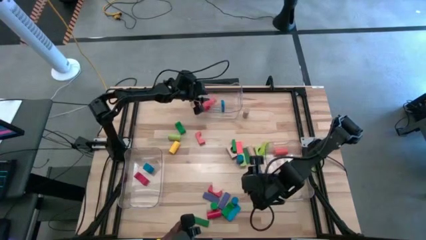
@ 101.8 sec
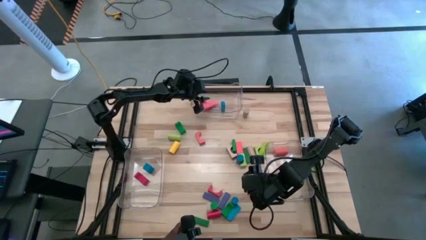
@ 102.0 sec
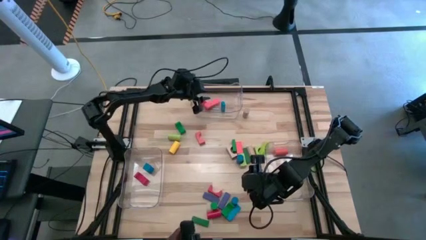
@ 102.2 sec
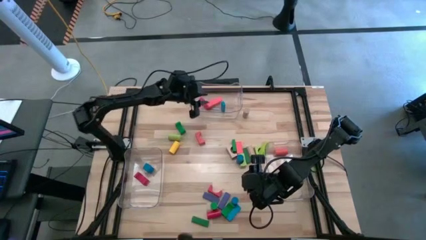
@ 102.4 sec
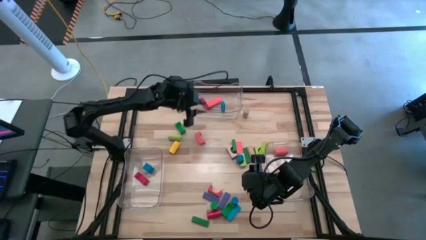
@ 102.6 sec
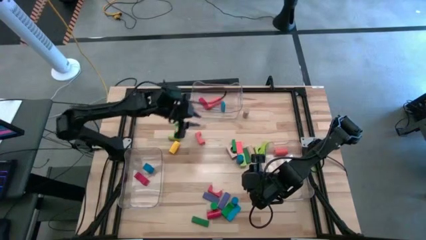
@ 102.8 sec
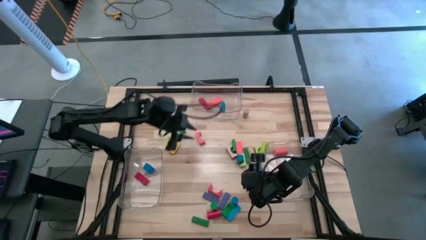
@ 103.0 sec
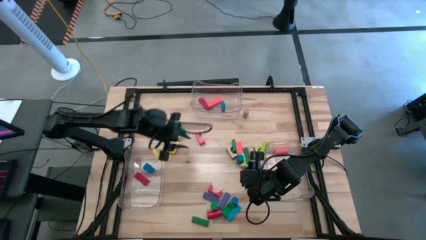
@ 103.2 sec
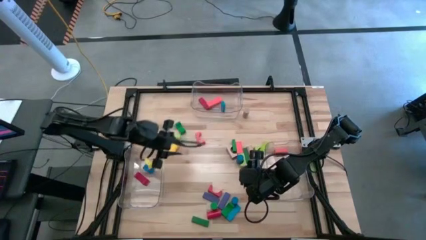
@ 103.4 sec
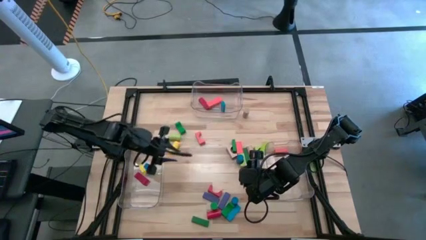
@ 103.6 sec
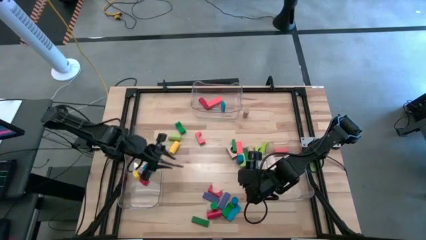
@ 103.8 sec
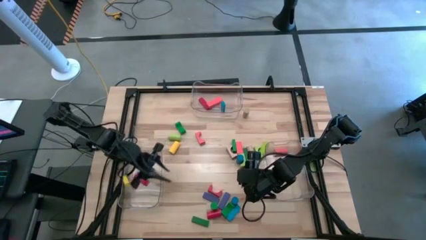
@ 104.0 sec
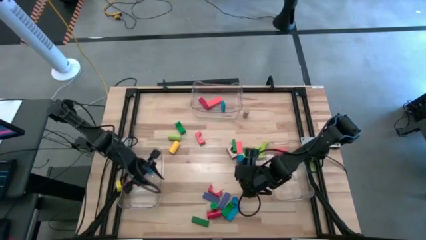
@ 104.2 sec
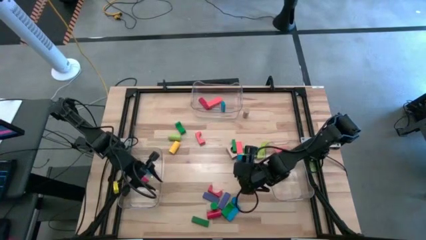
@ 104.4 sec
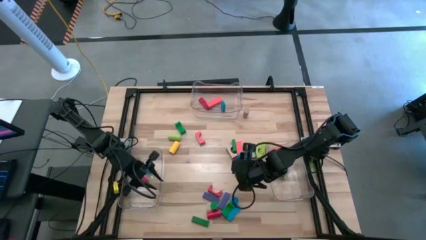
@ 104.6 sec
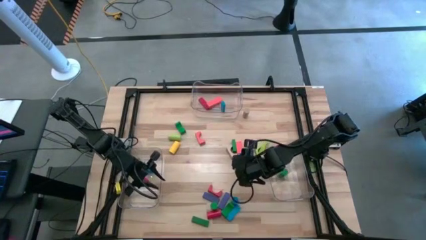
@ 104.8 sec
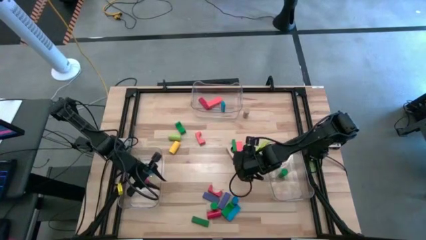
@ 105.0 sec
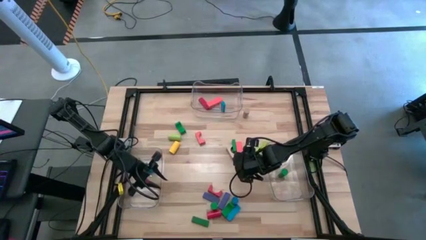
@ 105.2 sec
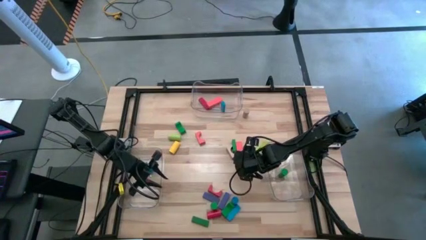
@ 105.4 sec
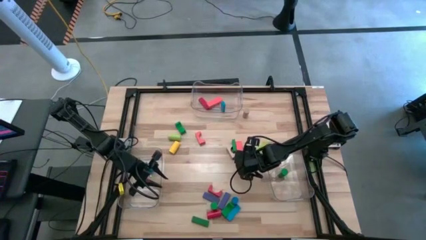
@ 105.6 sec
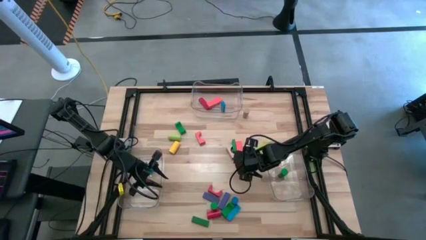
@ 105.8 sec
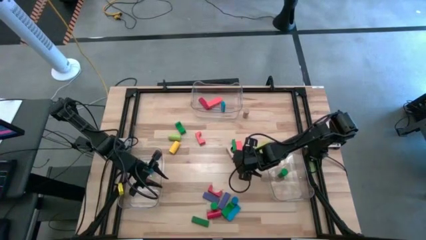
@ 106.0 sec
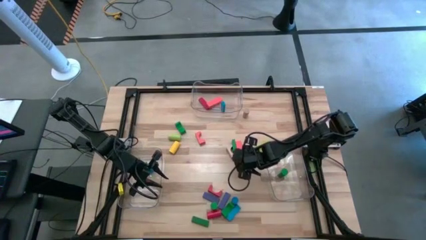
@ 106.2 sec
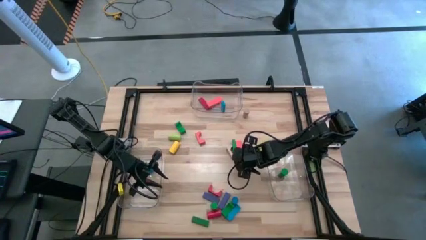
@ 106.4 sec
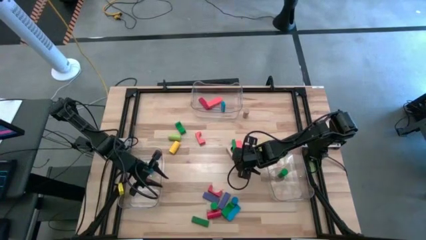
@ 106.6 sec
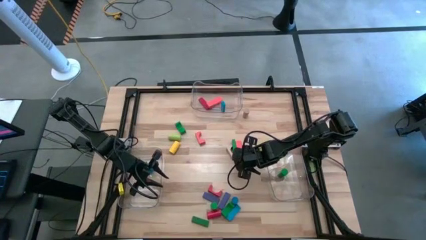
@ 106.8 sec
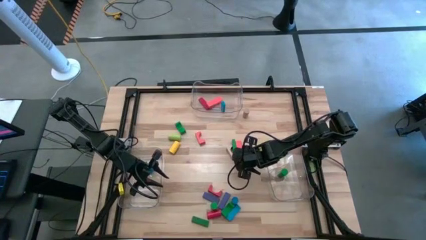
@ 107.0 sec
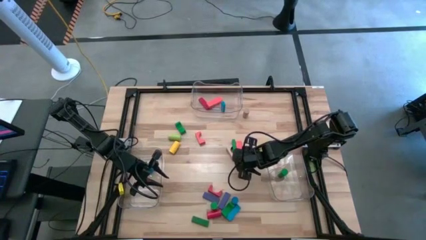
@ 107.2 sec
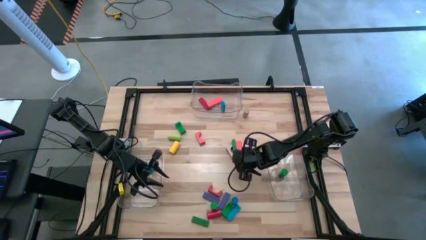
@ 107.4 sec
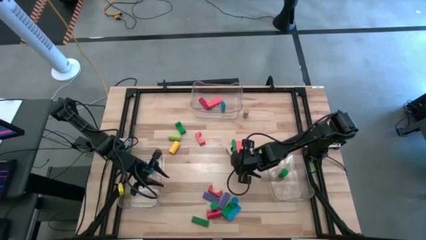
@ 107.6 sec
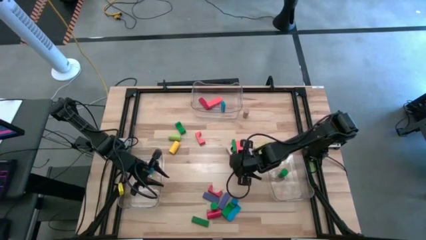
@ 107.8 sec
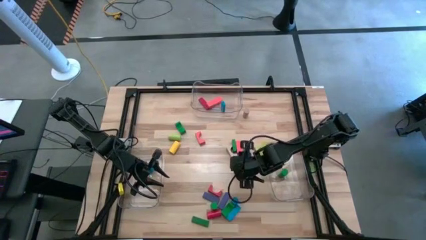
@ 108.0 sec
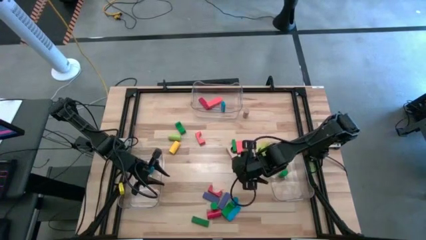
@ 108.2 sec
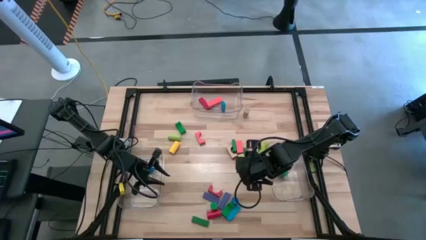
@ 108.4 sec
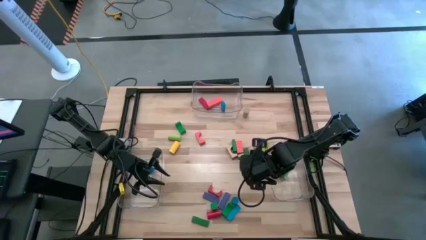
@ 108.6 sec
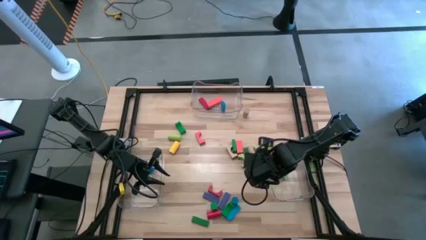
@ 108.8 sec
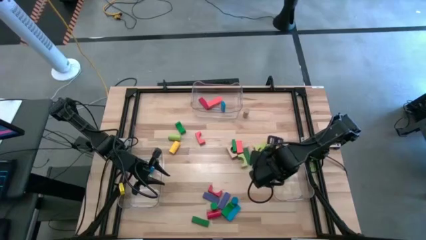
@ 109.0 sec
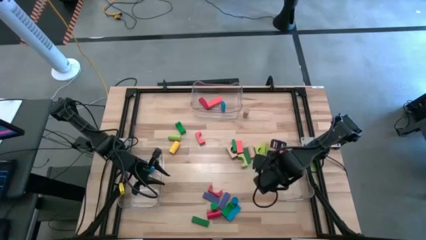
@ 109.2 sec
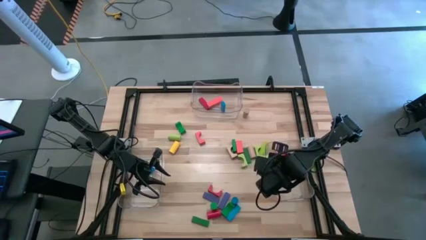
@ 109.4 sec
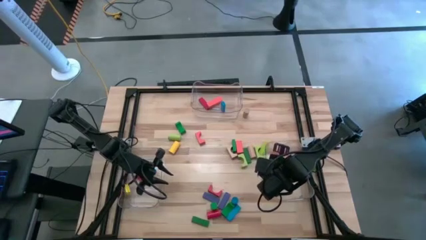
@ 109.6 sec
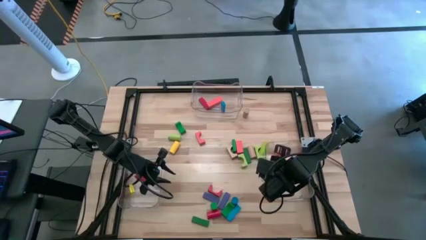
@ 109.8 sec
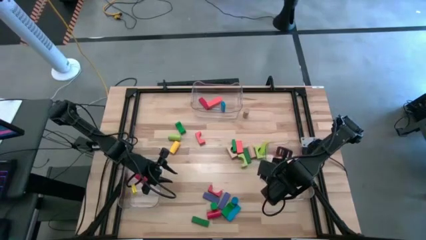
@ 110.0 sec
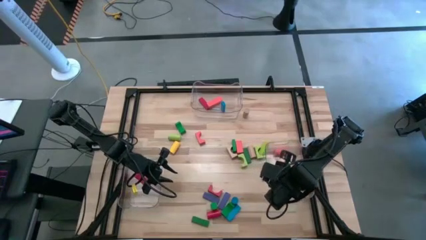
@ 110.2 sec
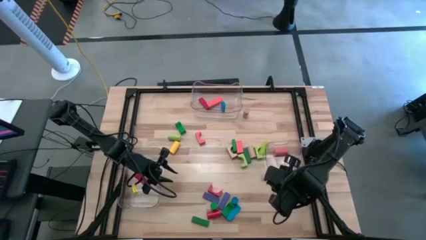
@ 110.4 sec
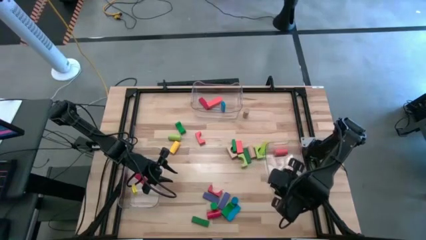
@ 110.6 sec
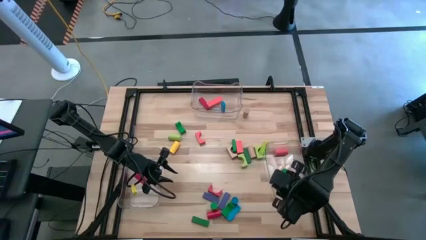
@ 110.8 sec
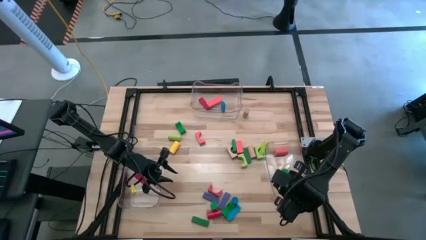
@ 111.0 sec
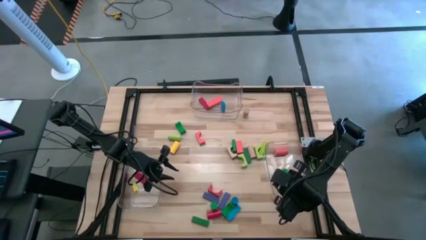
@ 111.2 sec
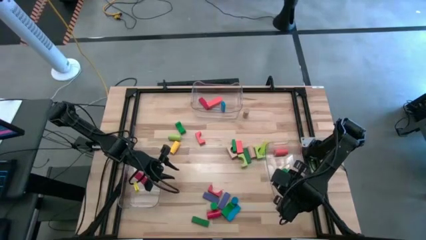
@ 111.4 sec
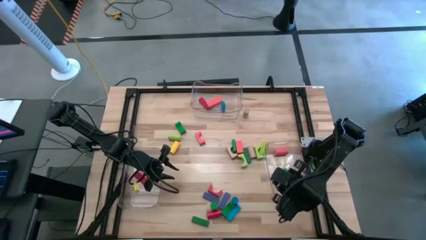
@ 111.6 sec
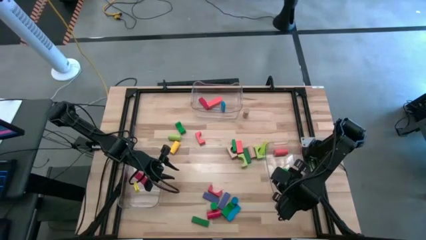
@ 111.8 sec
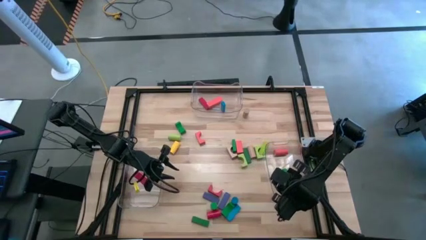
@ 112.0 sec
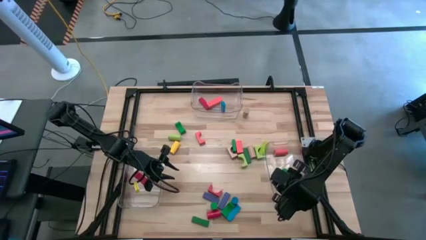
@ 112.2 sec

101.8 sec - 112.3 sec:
Task: Sort blocks by size
Put the blue cylindrical block into the right transparent bin
